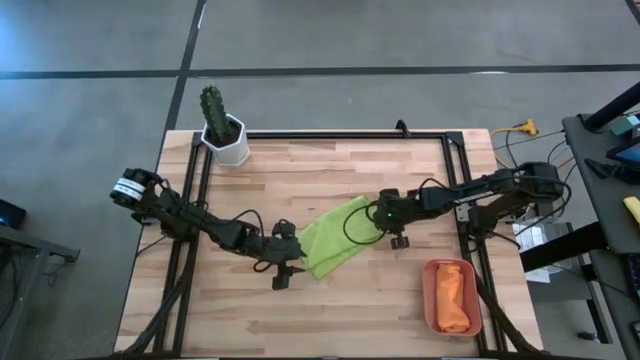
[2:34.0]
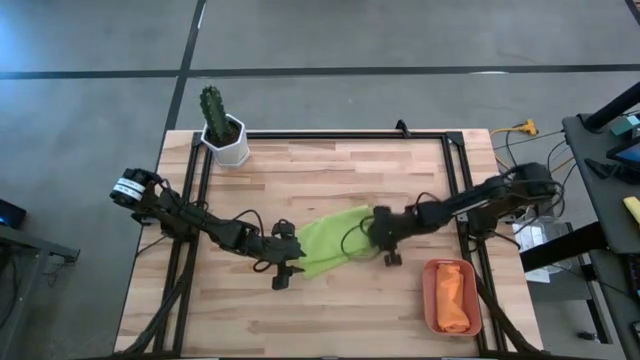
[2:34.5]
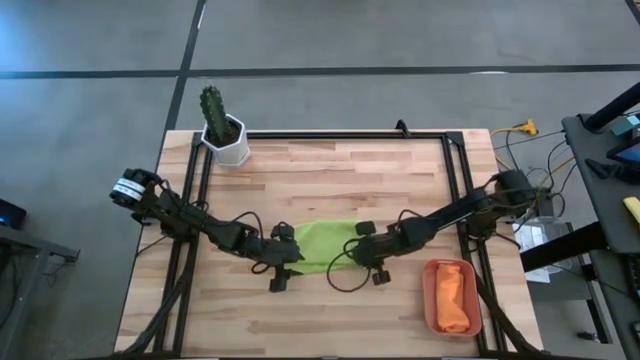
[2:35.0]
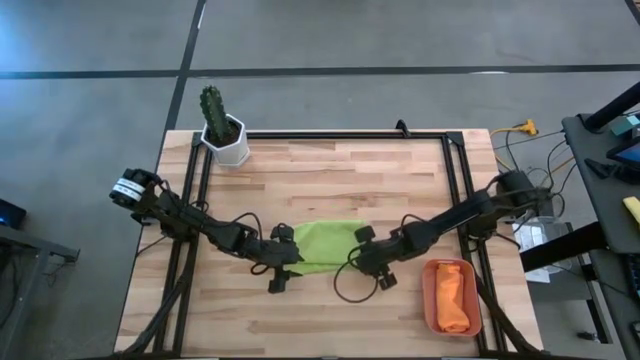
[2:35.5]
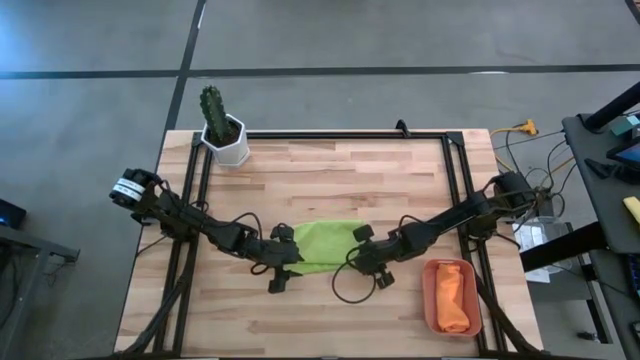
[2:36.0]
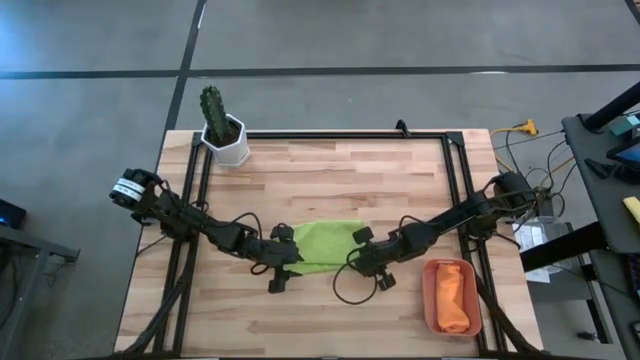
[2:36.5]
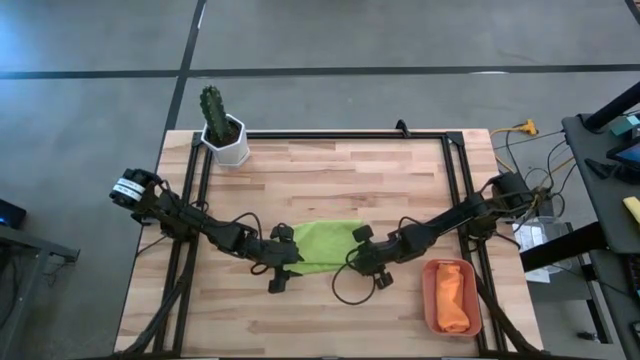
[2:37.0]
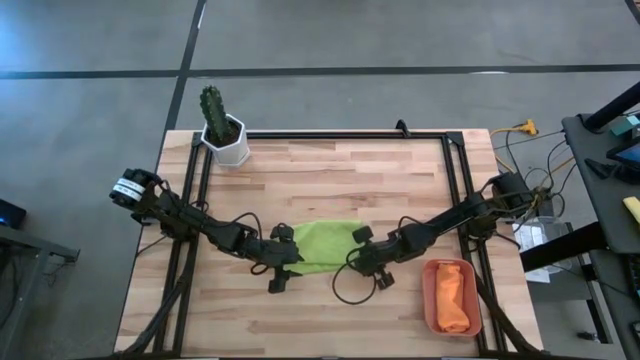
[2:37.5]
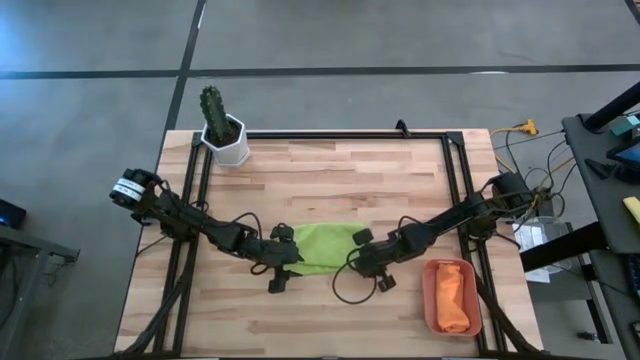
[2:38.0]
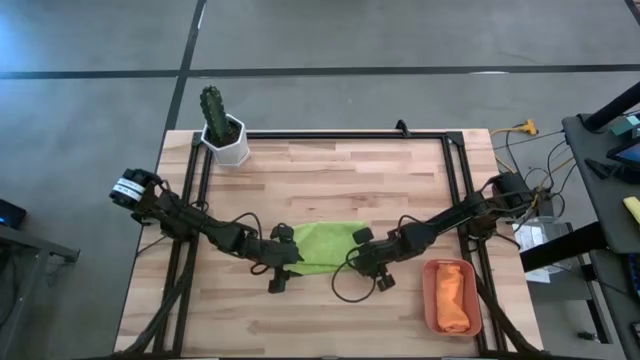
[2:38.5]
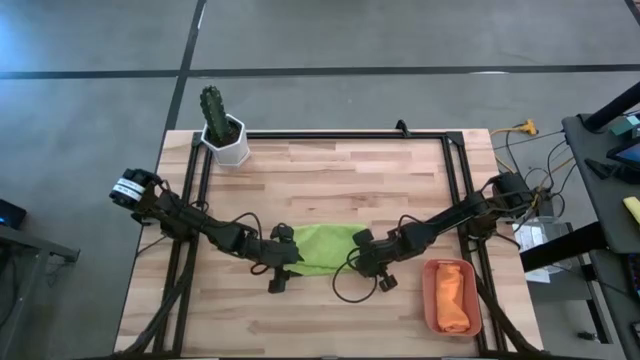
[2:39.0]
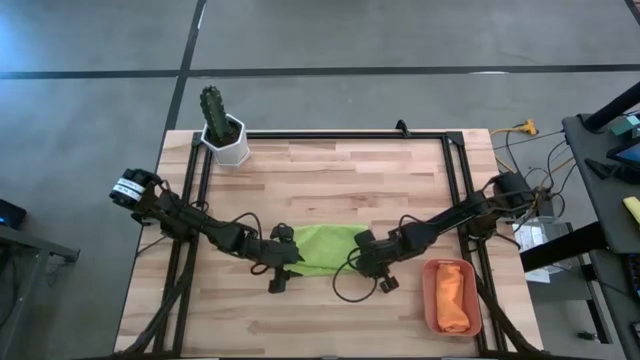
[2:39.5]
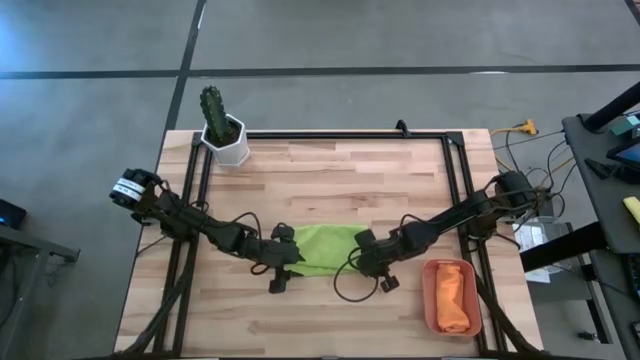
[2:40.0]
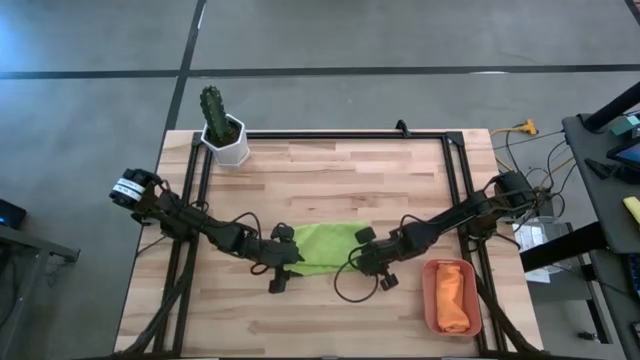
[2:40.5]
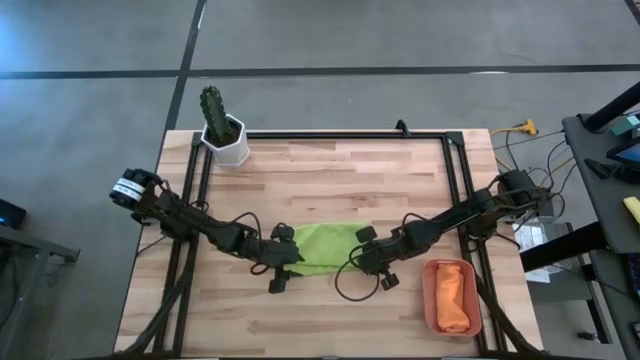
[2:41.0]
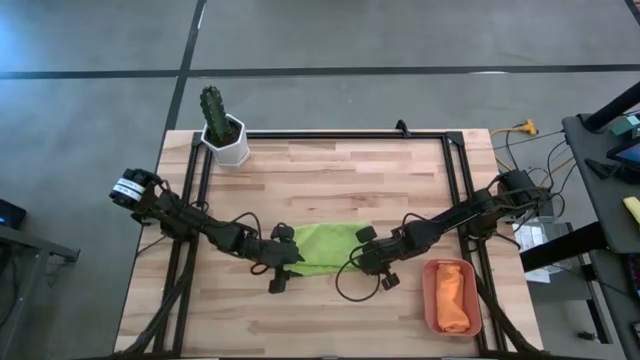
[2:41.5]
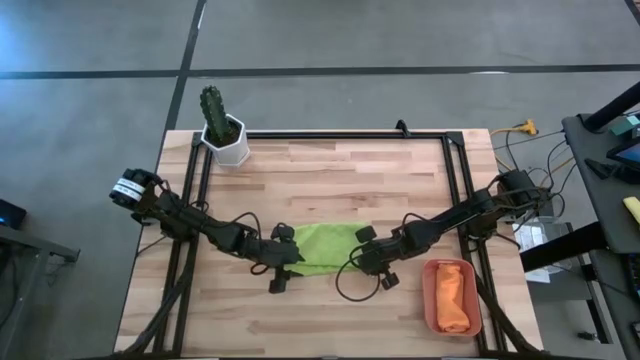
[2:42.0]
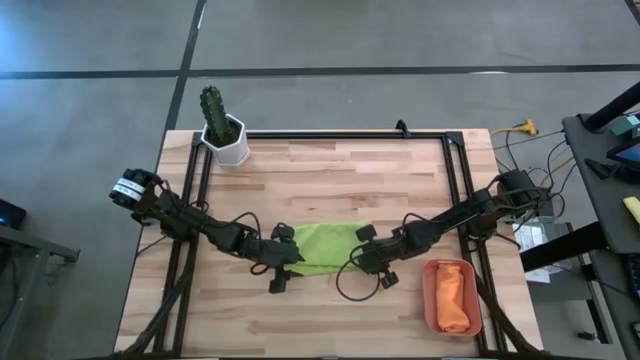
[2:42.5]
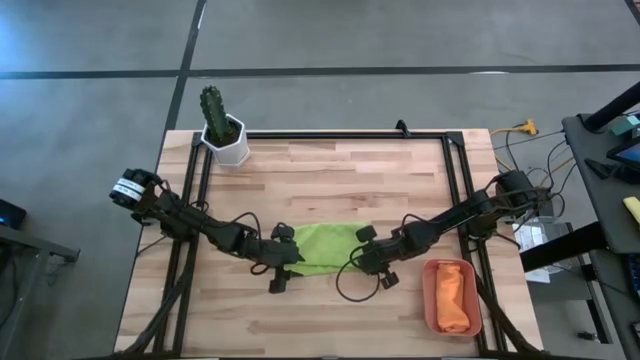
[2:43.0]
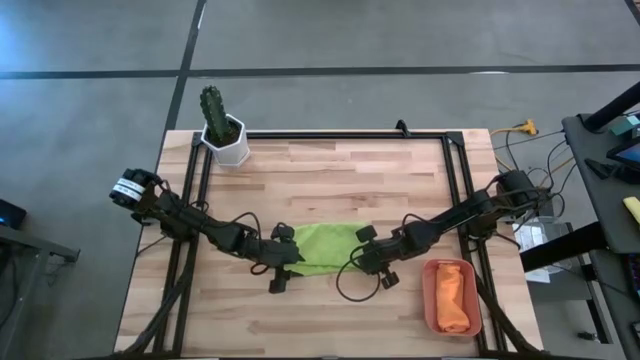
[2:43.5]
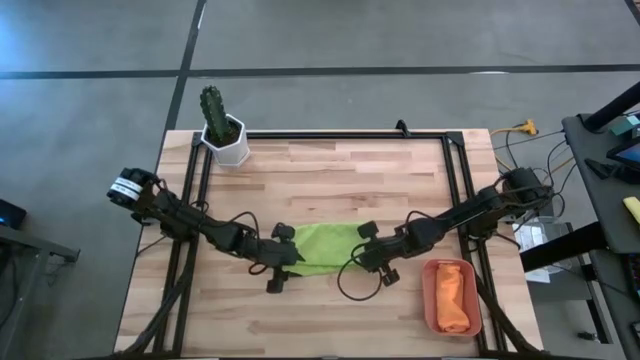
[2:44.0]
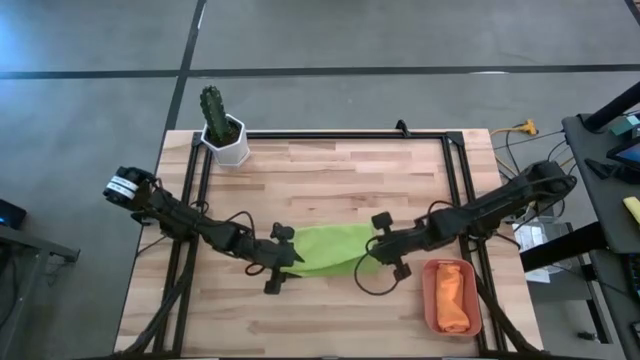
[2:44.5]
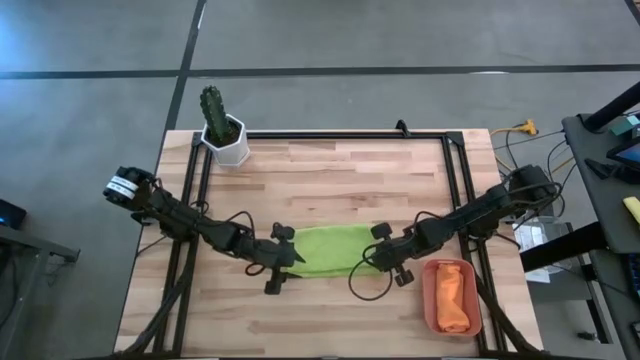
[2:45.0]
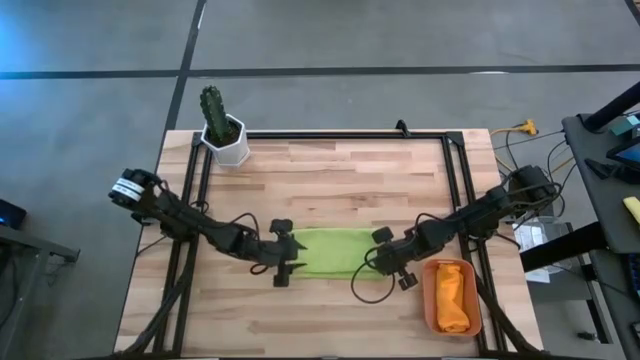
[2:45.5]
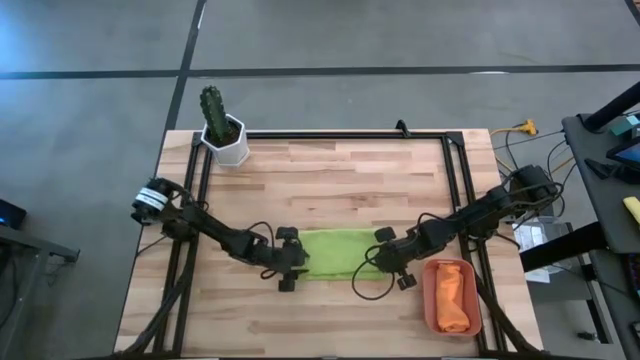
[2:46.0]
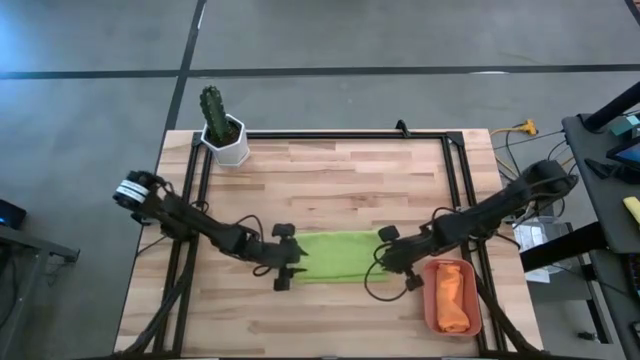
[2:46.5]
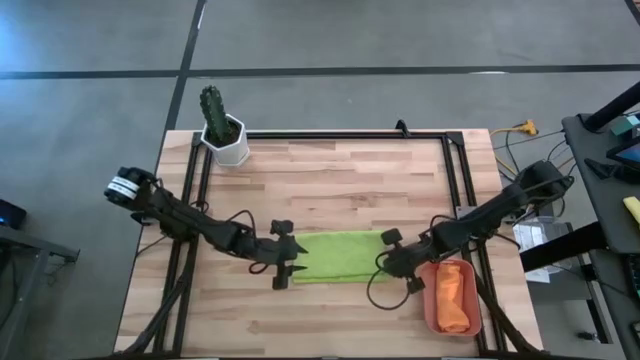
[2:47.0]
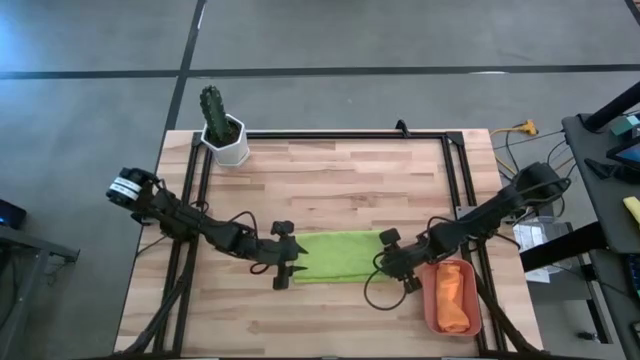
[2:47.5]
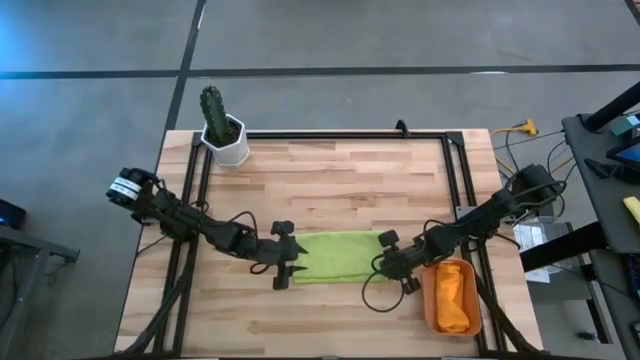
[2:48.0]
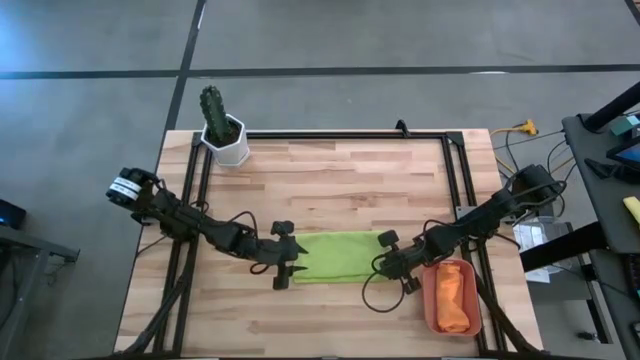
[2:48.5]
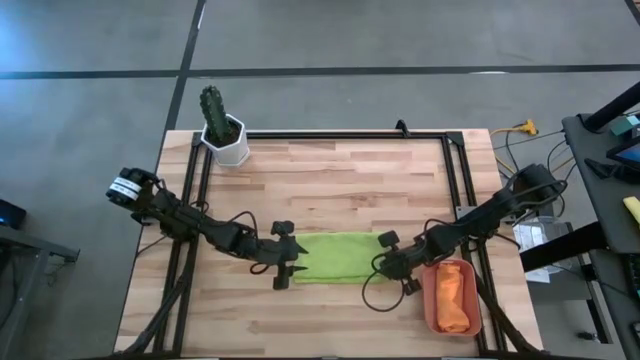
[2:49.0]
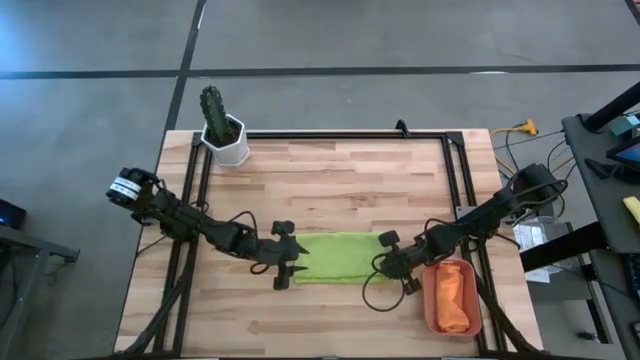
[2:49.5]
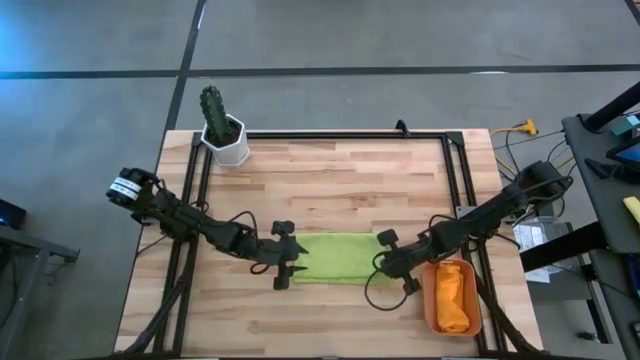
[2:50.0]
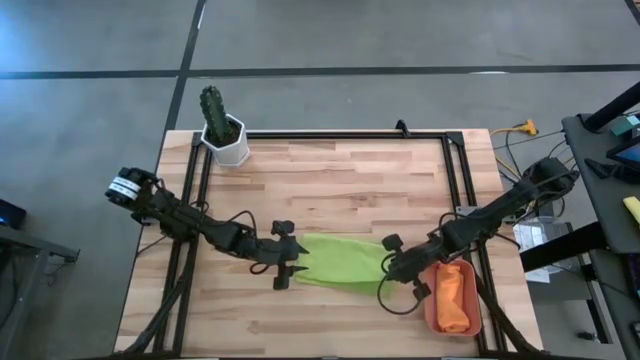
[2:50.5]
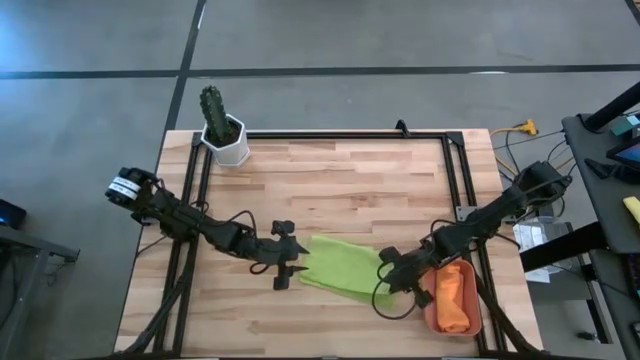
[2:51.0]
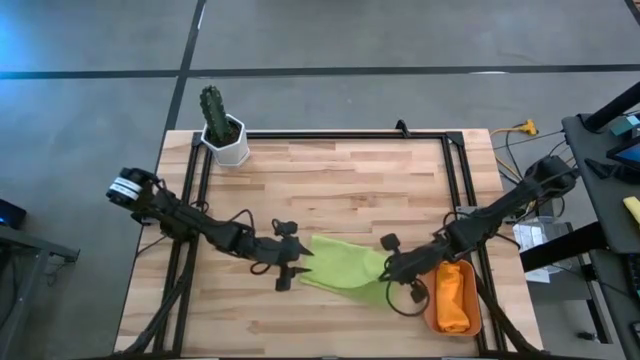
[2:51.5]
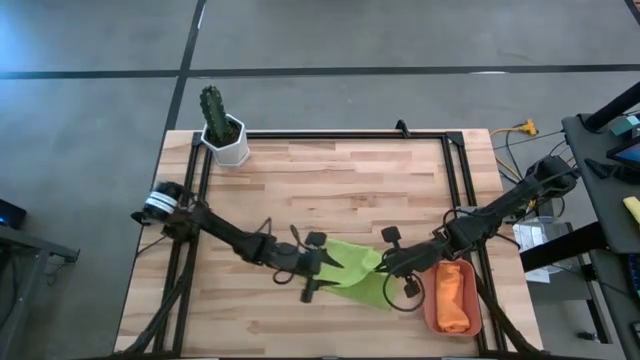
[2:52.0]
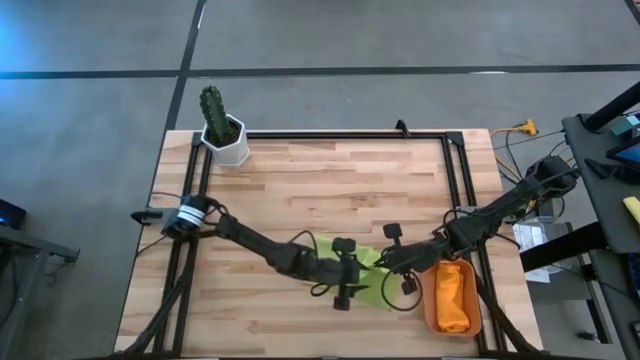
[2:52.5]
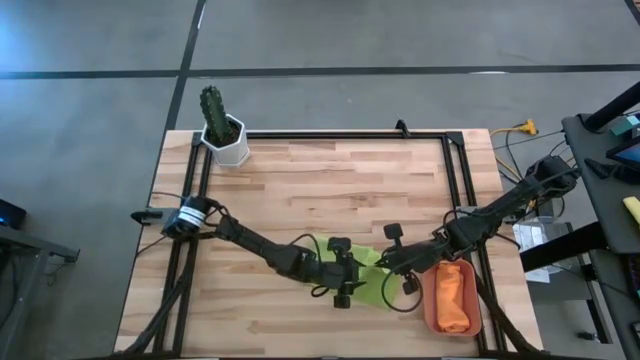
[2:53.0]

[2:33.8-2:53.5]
Task: Roll microfiber towels into tight, uniform cylinder then place into a basket
Fold the green microfiber cloth

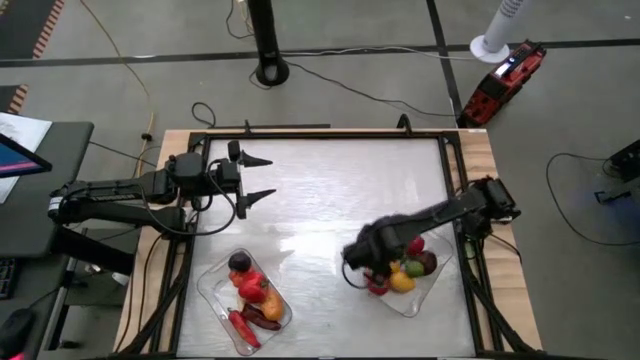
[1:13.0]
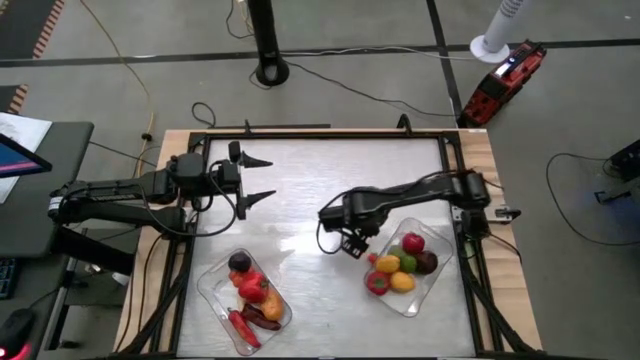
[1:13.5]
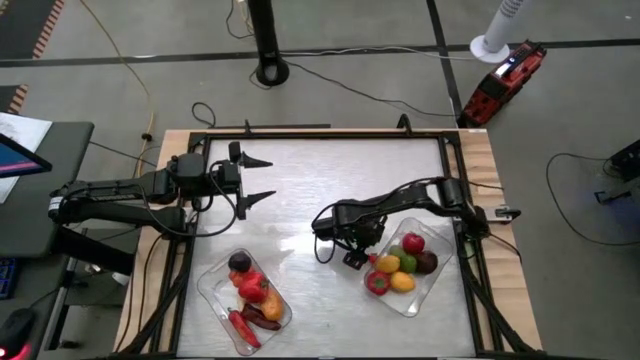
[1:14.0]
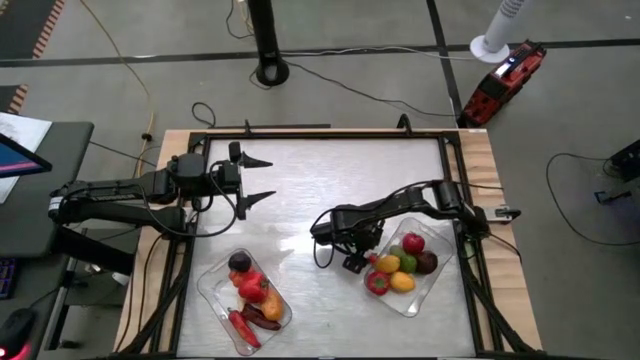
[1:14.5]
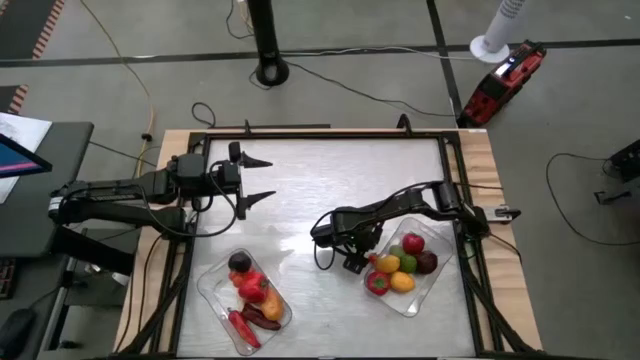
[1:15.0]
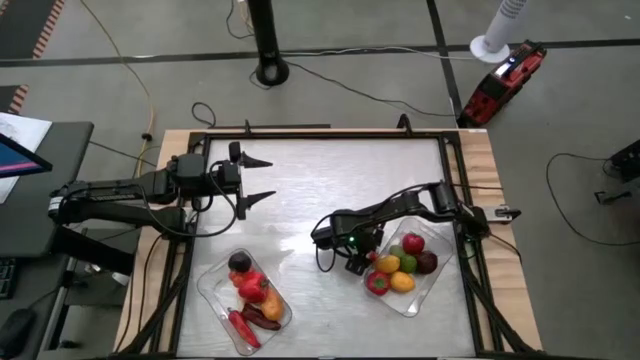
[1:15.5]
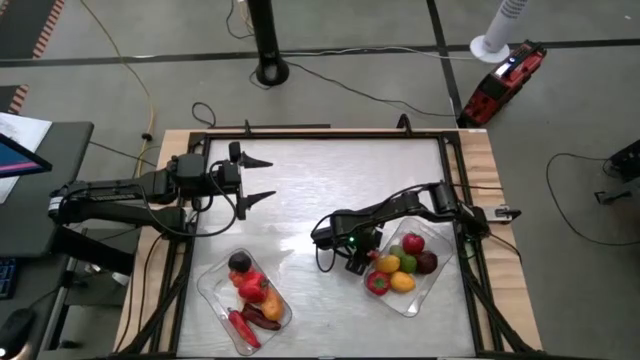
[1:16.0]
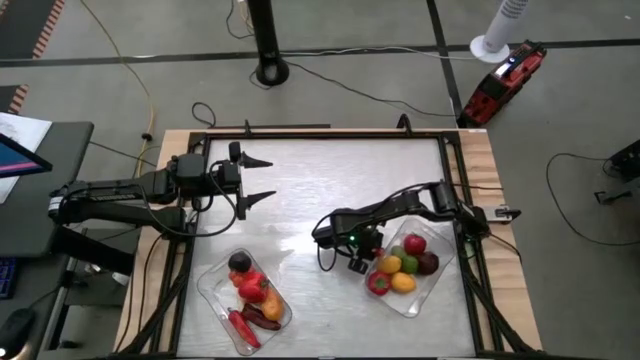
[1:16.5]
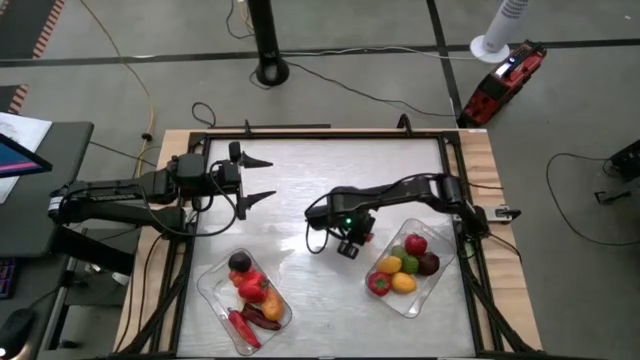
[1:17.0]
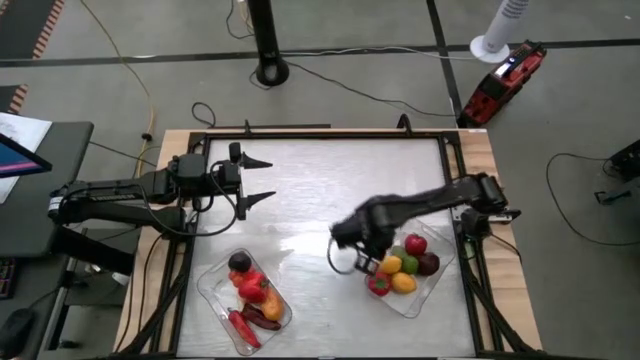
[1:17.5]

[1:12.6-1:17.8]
Task: Sort produce into baskets
Put the tomato into the transparent bin
